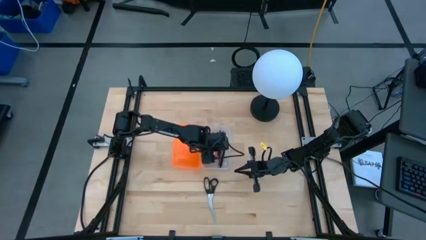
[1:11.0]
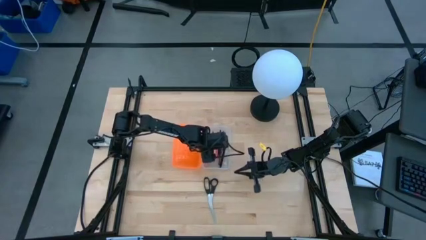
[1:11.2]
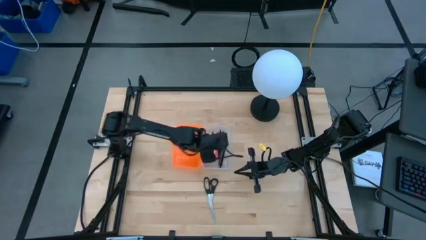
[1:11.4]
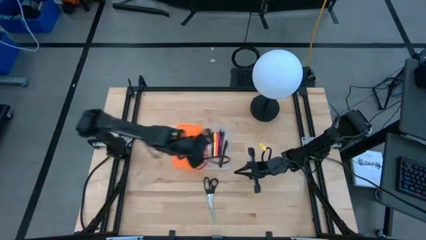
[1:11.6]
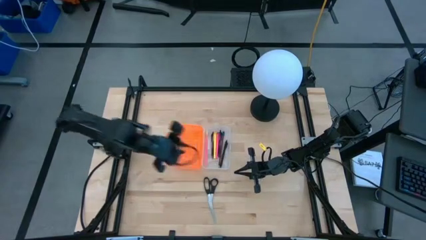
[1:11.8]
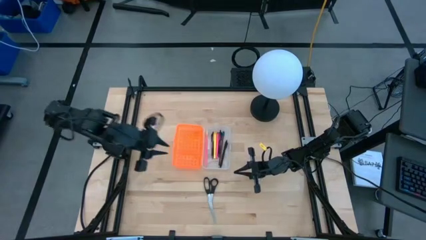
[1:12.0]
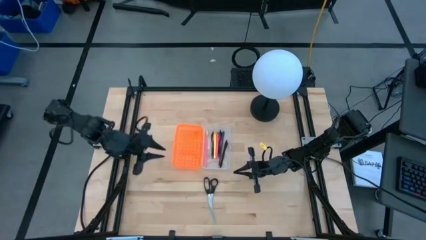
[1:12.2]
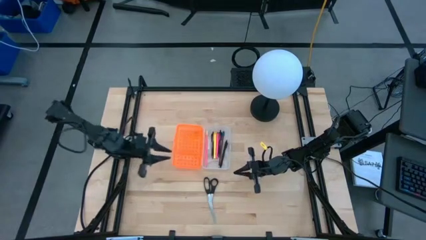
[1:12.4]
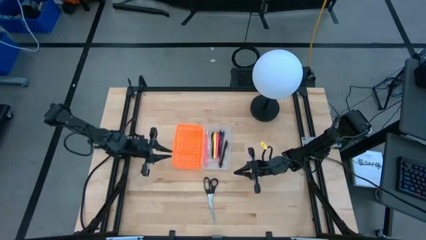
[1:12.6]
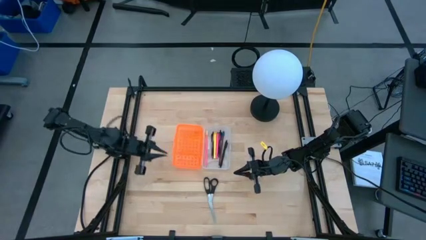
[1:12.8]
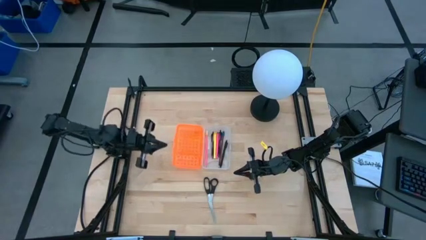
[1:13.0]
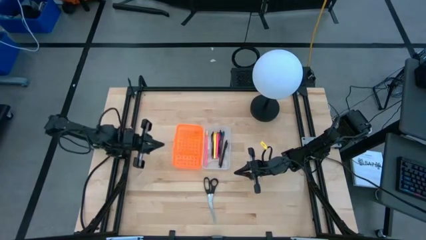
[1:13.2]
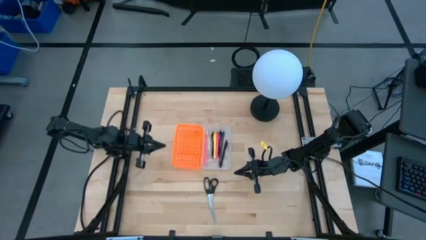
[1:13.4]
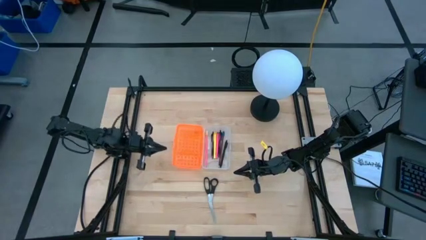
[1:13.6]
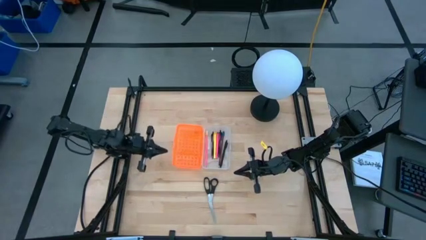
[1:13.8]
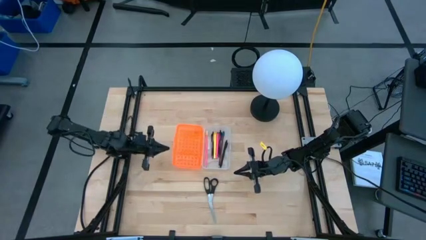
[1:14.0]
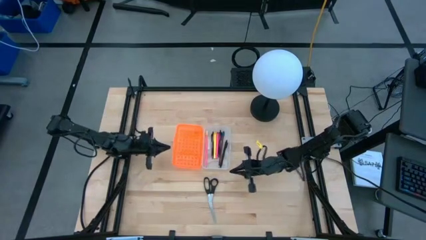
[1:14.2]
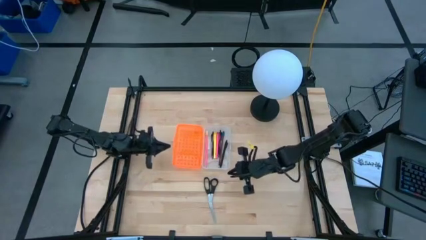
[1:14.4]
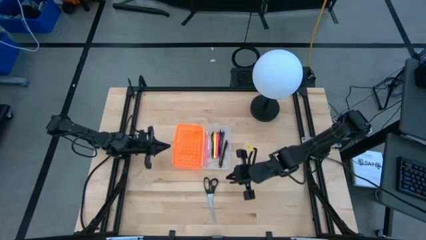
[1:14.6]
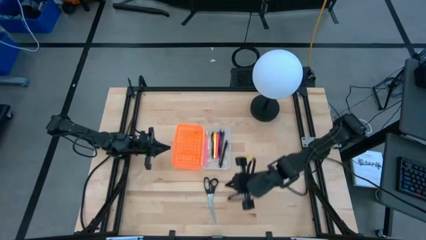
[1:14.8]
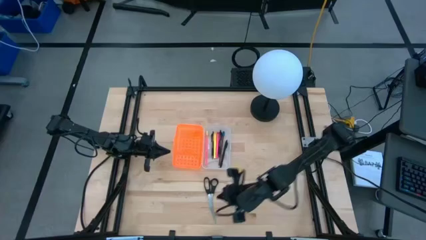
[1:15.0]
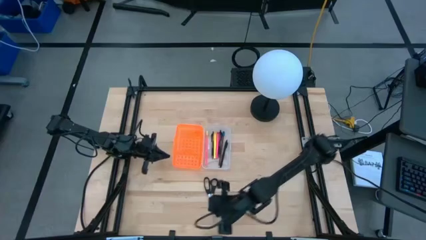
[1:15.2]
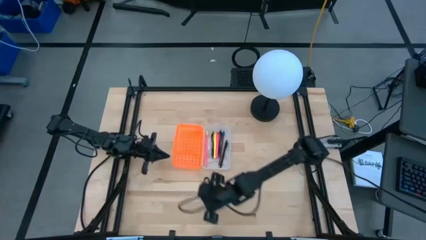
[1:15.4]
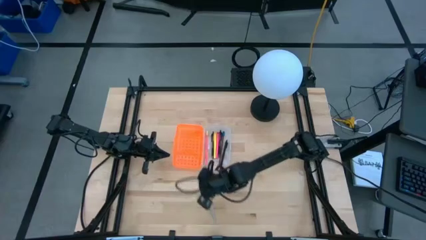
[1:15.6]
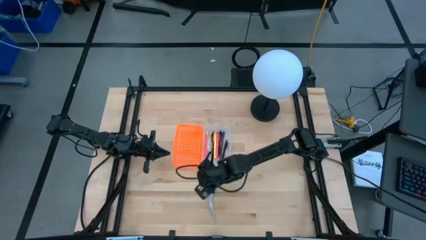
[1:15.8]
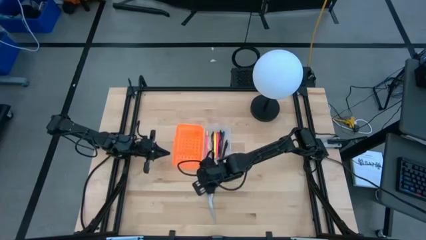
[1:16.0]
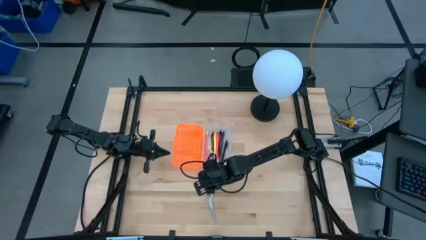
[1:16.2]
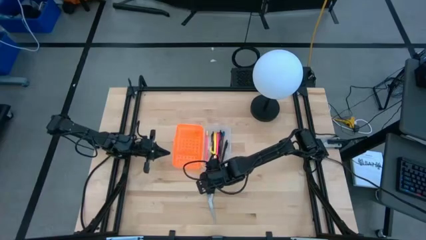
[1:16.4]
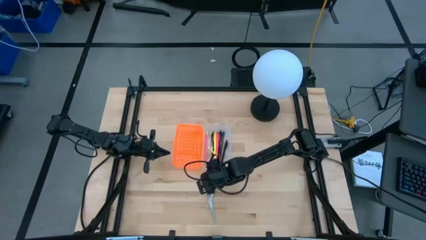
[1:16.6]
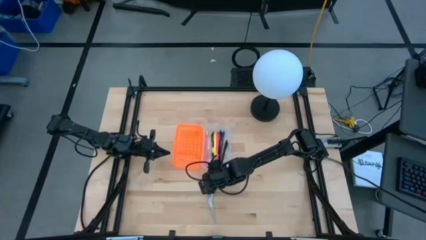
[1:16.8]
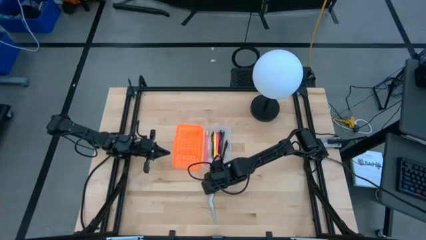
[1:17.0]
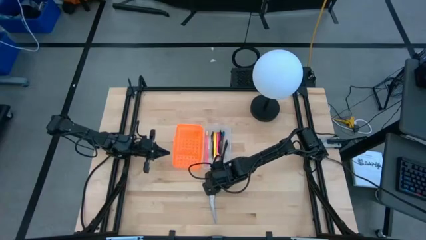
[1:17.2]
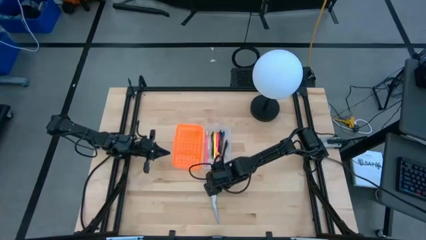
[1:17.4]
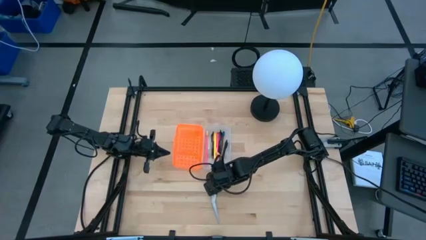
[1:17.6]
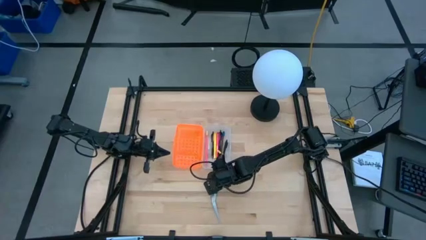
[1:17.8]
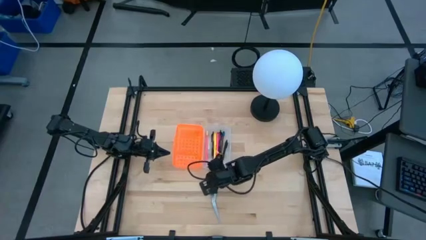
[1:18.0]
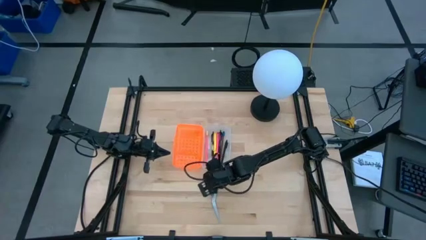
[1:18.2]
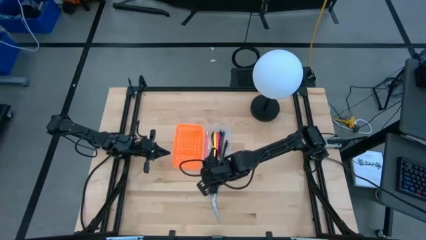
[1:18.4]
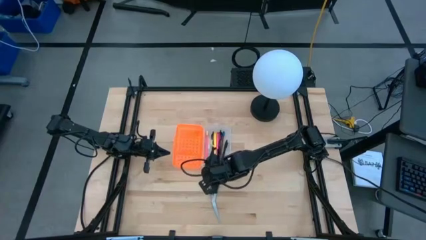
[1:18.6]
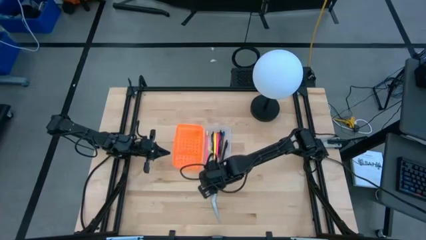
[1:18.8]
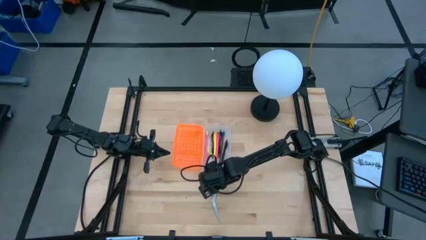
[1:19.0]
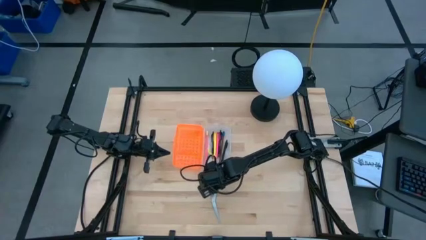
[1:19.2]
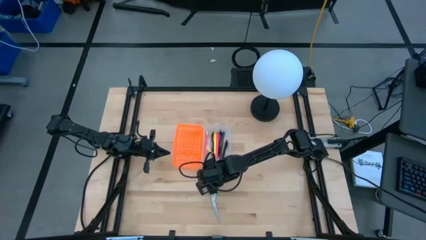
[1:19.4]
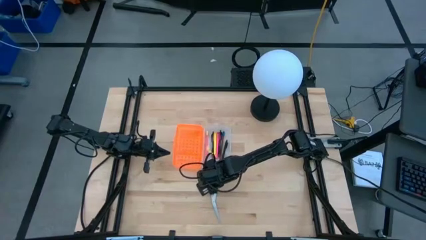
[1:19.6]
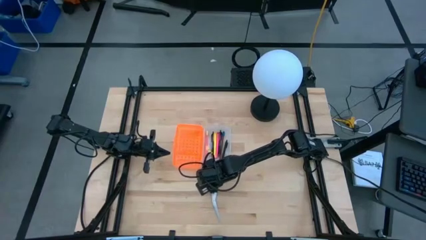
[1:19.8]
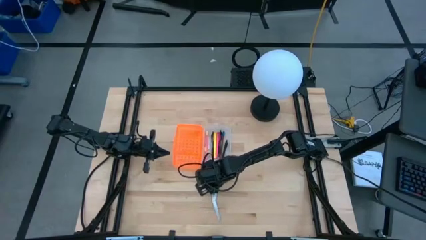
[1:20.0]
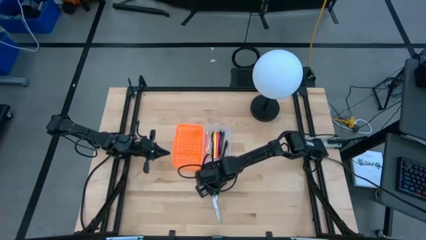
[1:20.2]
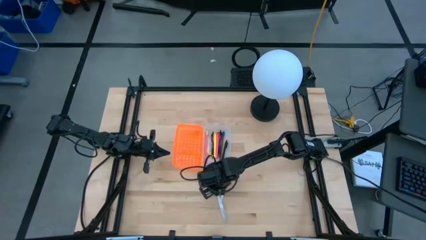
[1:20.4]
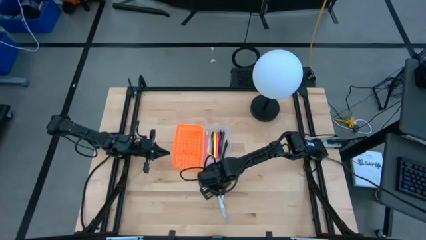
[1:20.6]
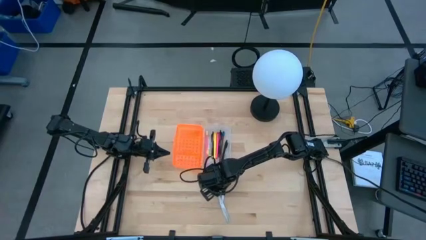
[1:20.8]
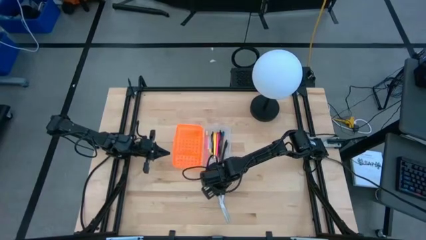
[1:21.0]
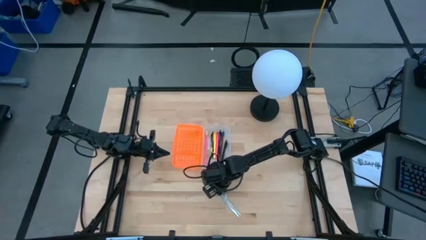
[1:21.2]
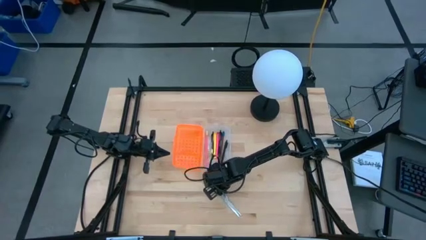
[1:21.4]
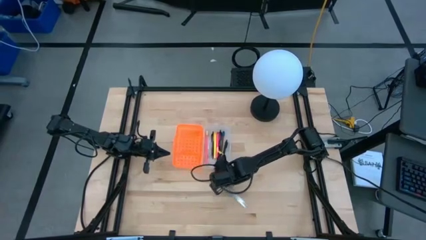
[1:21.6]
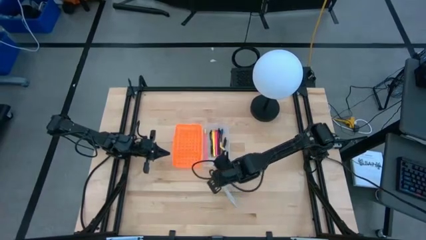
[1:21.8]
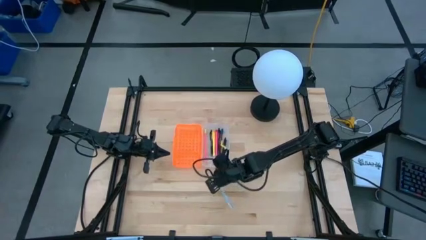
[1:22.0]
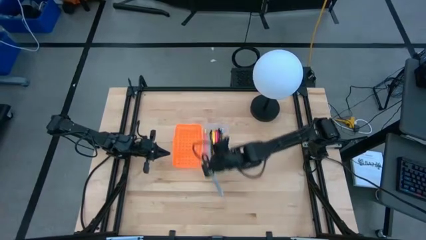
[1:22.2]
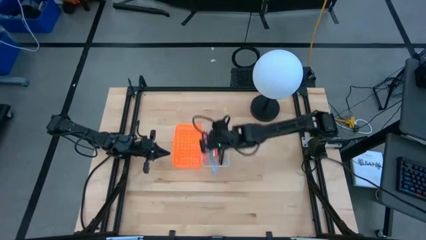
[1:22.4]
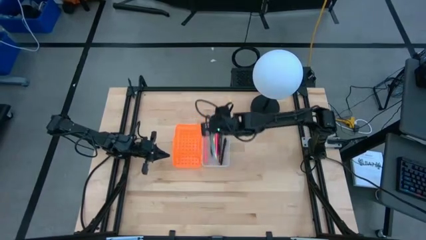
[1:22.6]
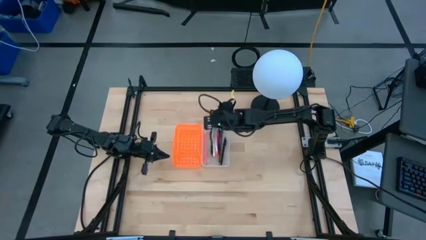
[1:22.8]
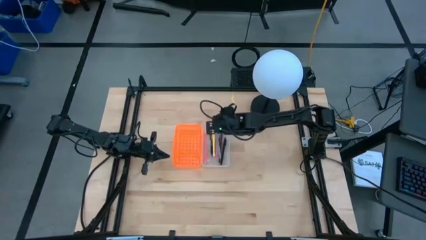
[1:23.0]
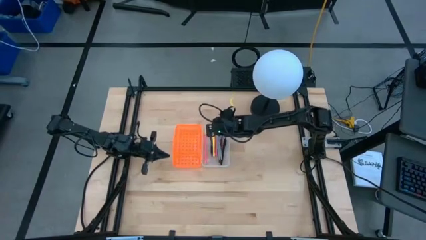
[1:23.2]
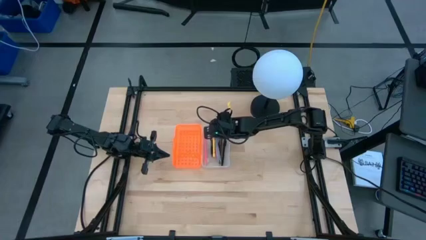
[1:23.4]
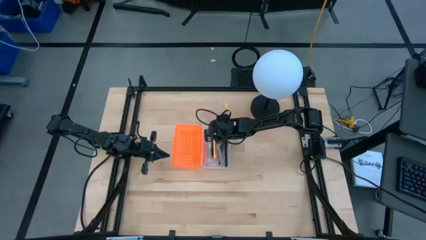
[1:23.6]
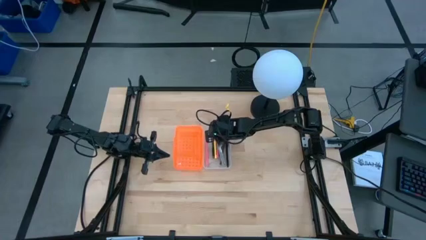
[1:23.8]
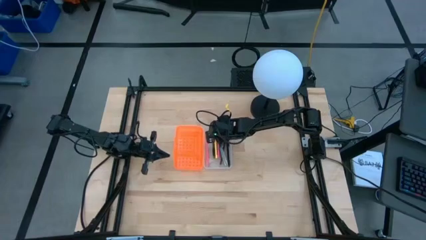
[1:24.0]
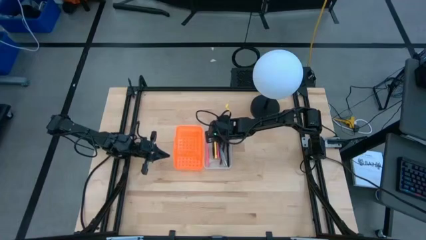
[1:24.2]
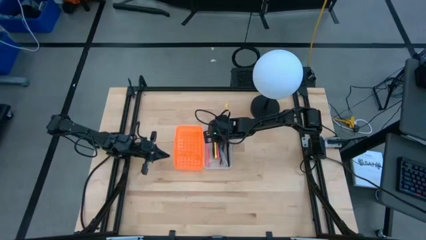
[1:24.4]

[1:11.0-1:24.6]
Task: Pick & place school supplies into a supply box
Put the black scissors into the supply box
